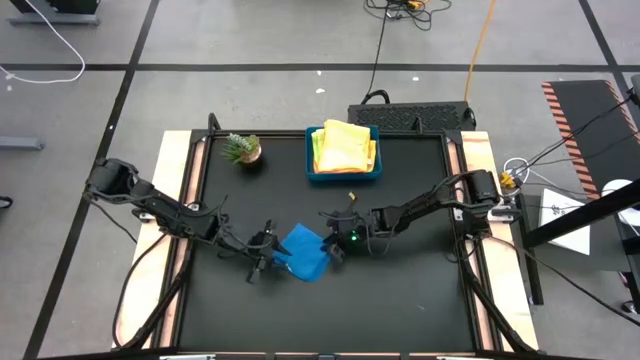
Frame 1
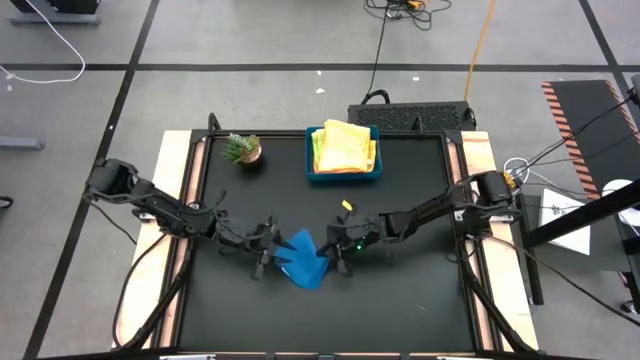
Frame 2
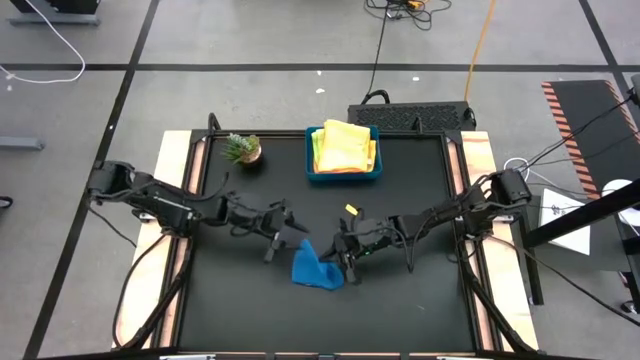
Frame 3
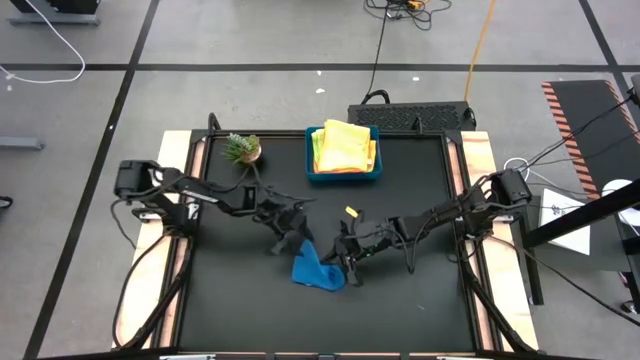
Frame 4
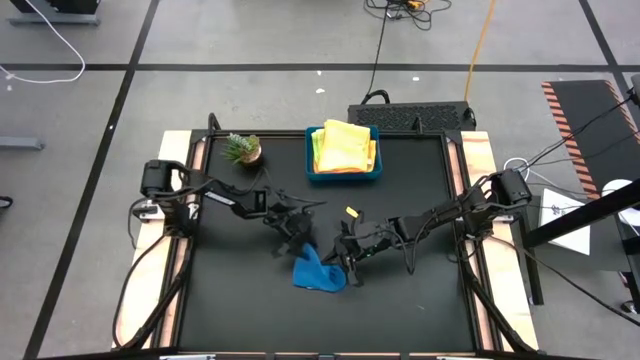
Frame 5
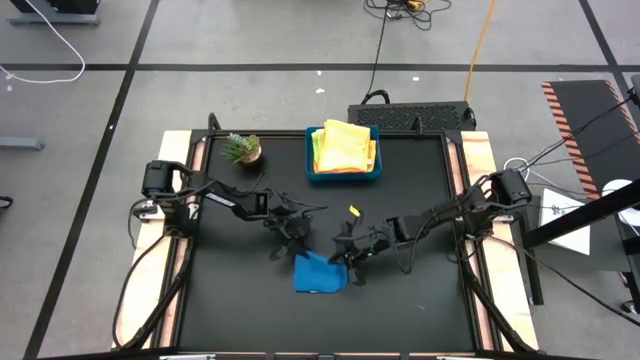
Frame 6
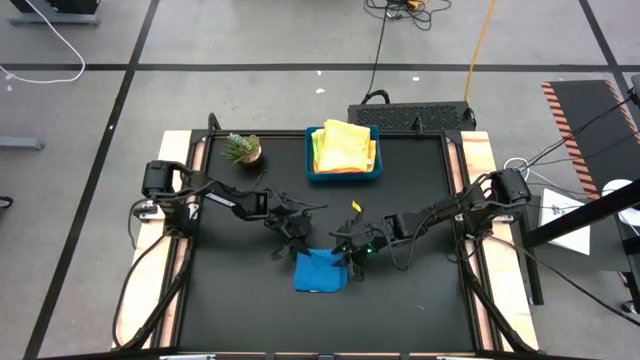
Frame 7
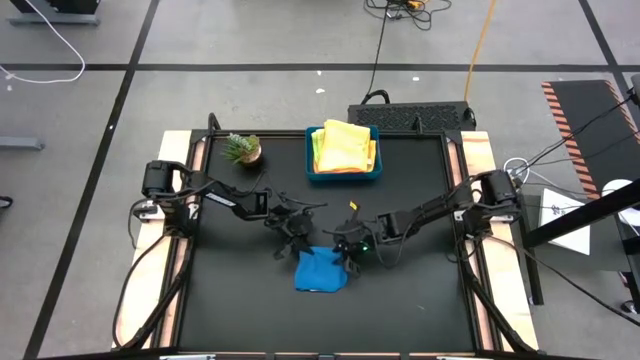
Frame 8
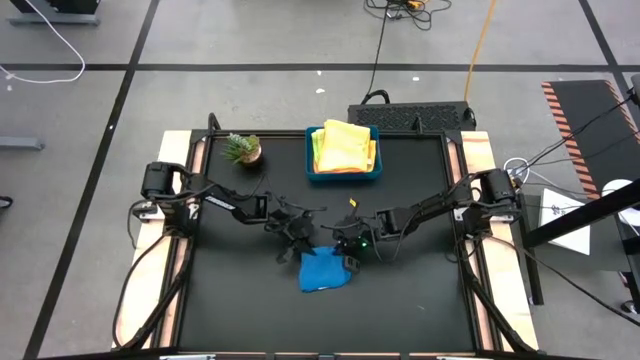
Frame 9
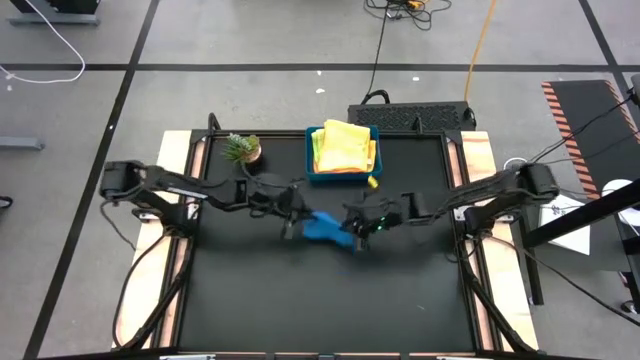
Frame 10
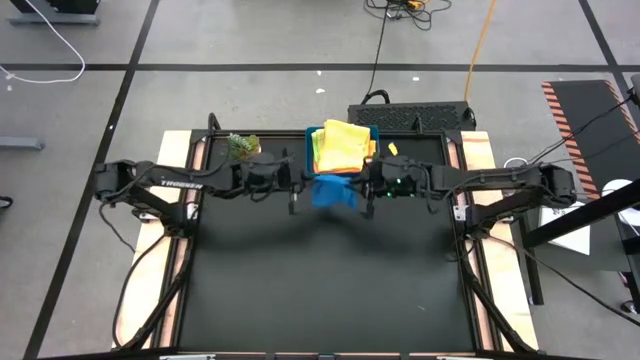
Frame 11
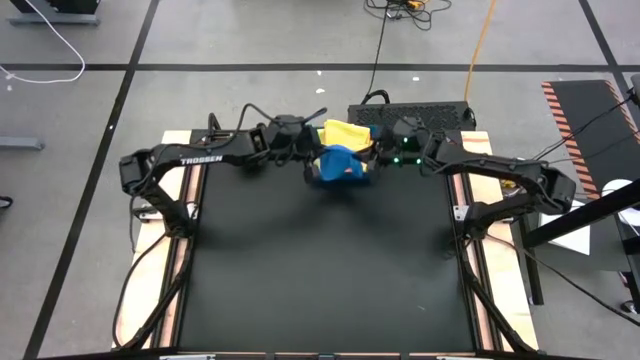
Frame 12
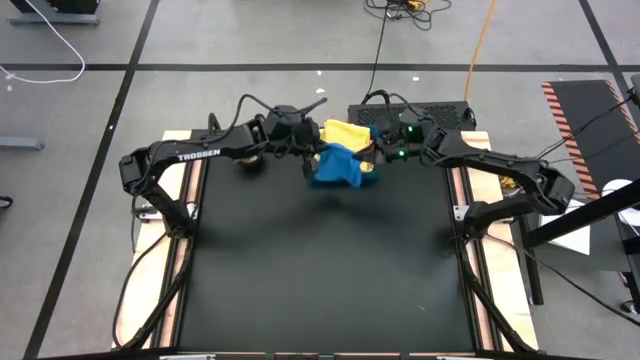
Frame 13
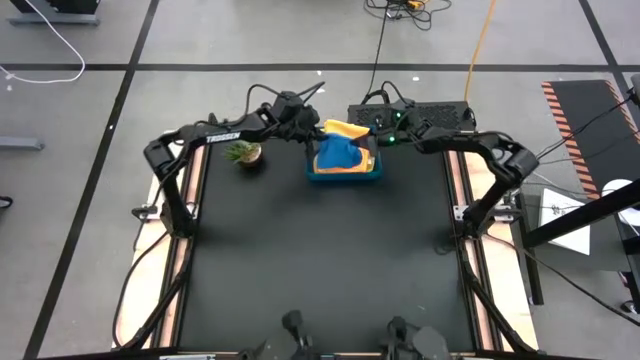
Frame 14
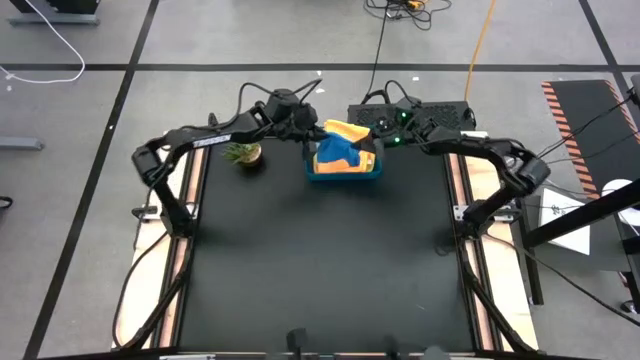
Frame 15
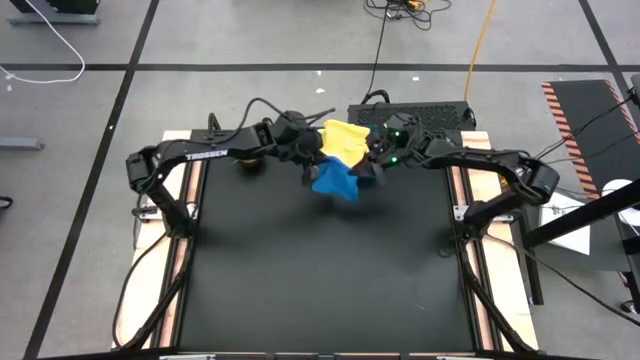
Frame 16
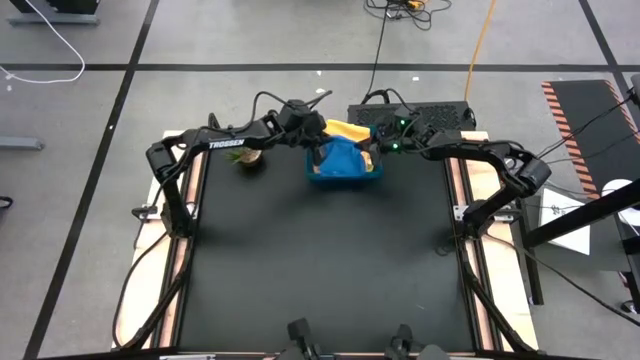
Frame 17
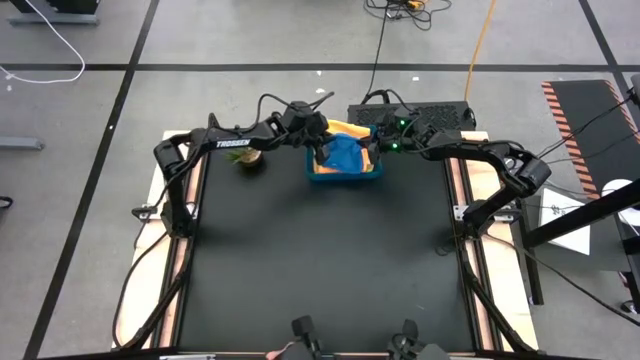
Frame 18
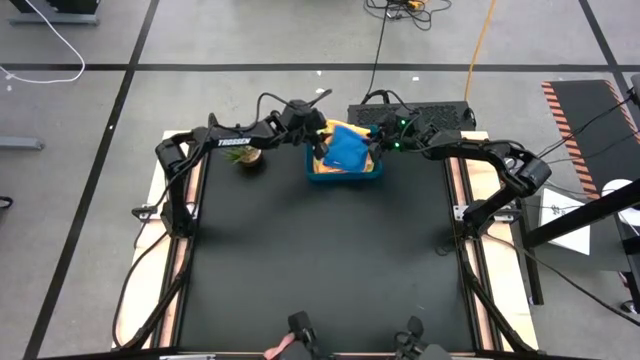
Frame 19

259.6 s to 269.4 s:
Task: Fold microfiber towels
Stack the blue microfiber cloth on top of the orange microfiber cloth into the blue bin

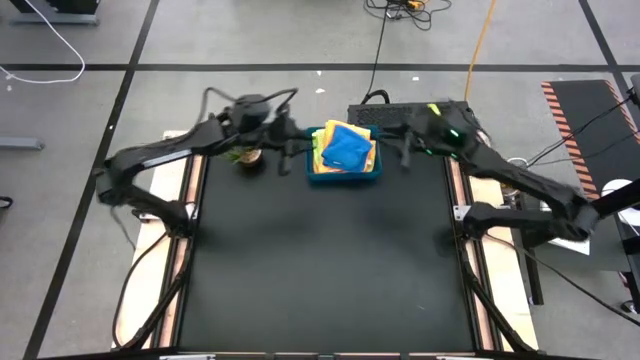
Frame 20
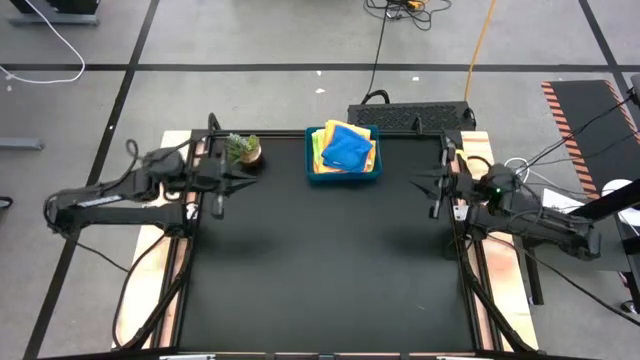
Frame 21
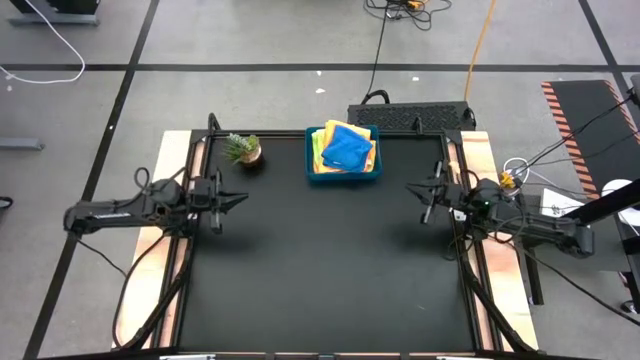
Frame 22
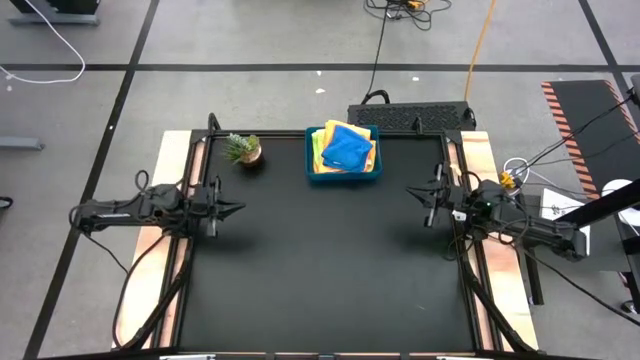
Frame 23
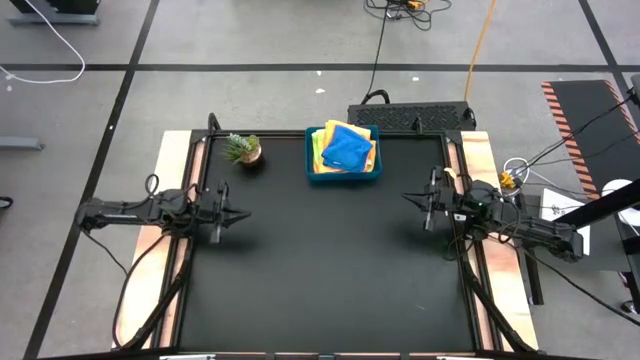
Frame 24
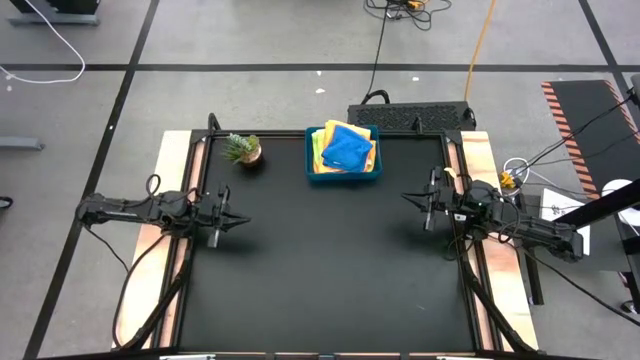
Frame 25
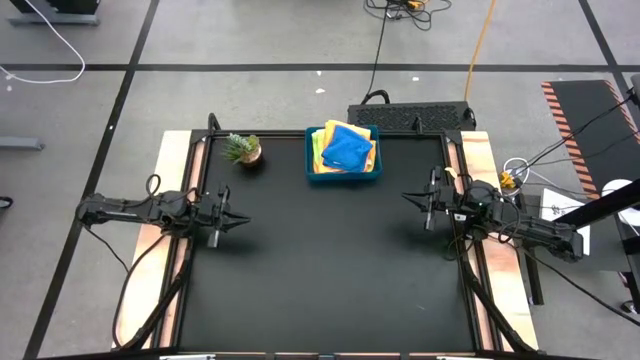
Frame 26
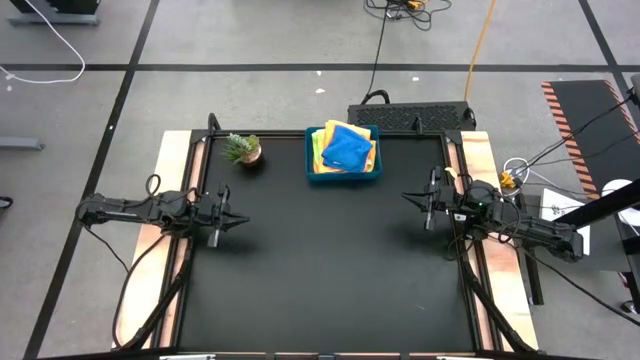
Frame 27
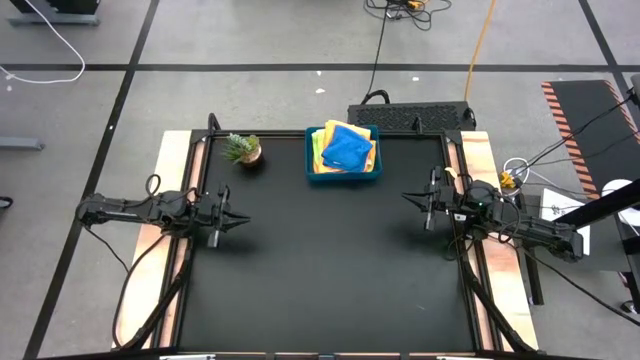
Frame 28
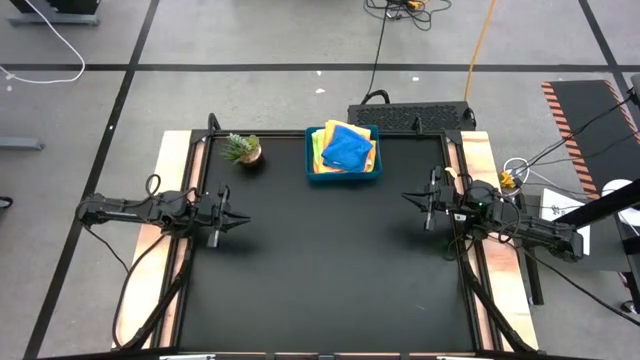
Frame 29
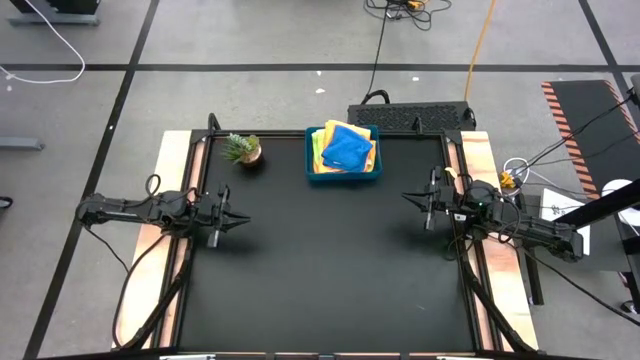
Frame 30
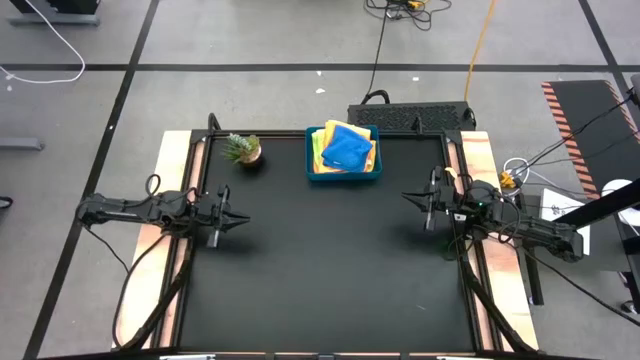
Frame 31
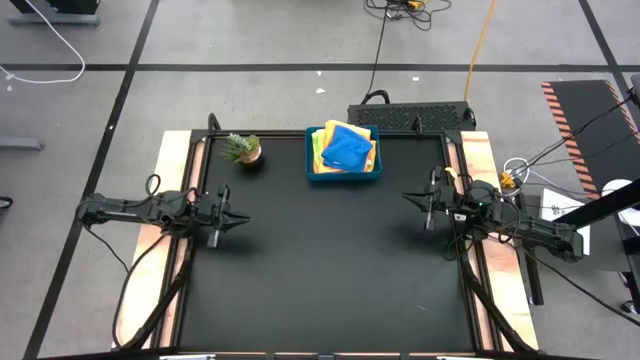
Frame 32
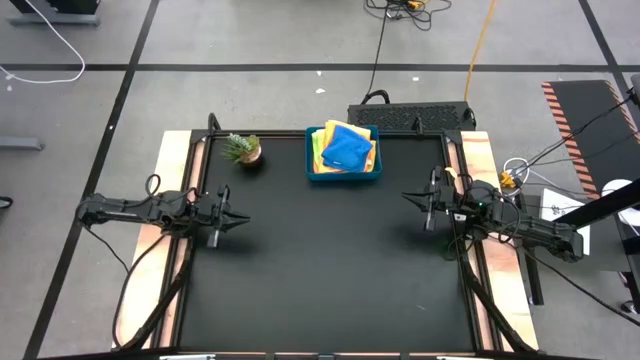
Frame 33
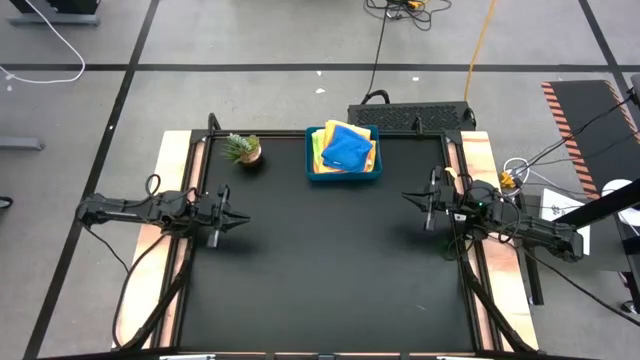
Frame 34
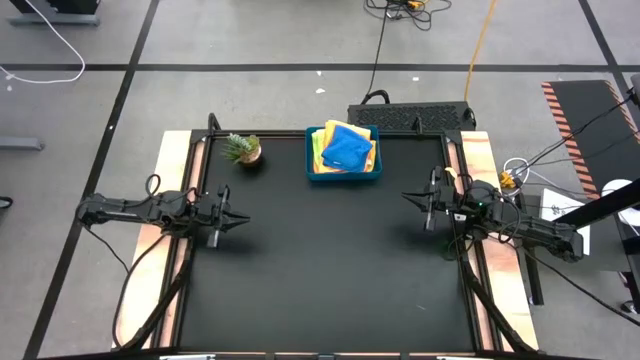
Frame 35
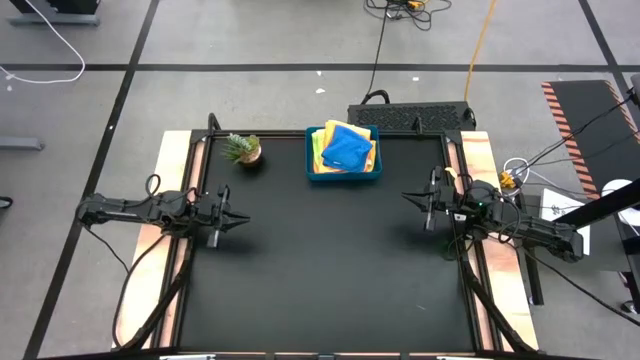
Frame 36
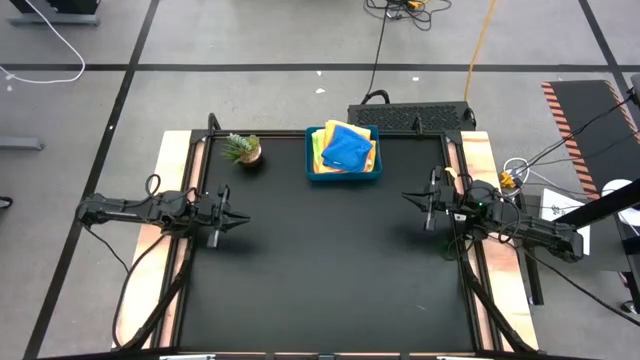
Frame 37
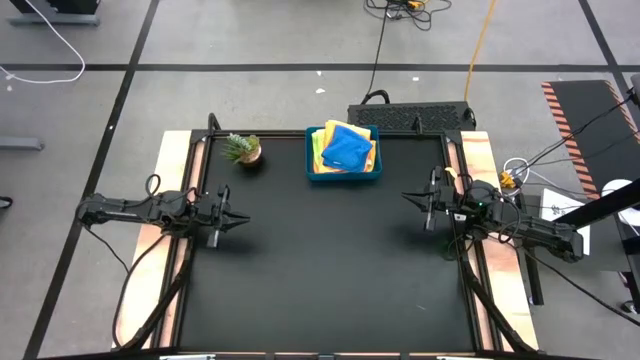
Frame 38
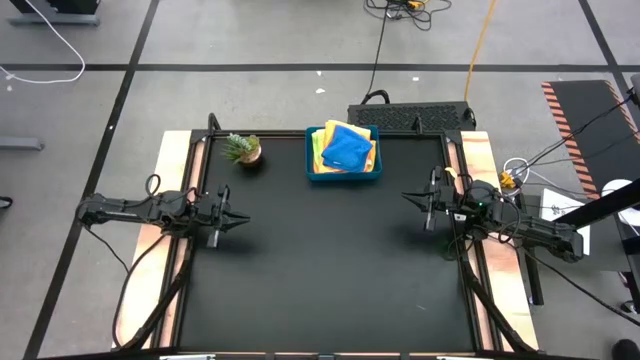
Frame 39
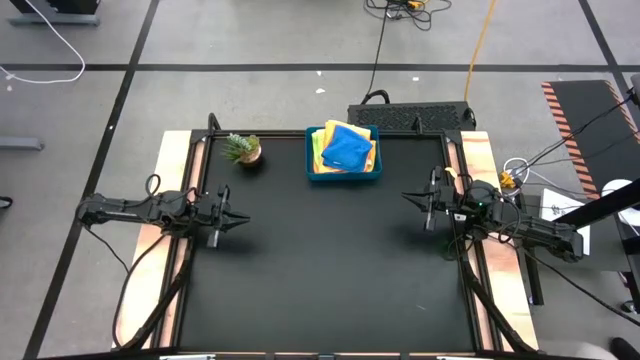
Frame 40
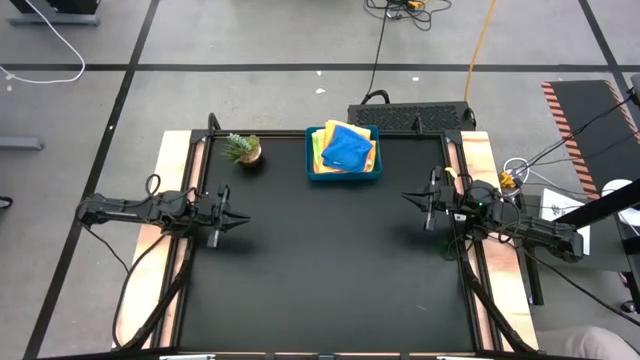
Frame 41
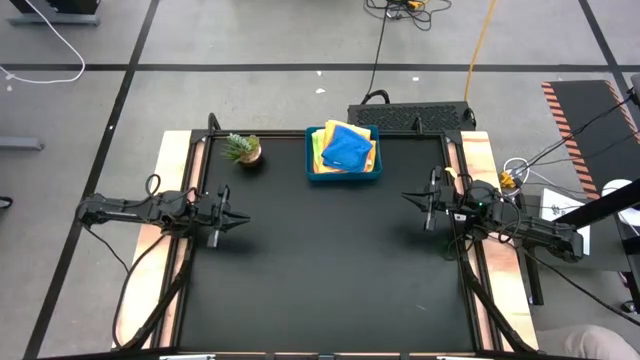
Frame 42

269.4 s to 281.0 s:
Return to Home Position
